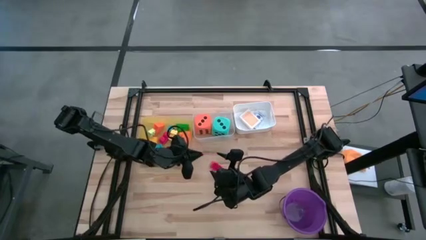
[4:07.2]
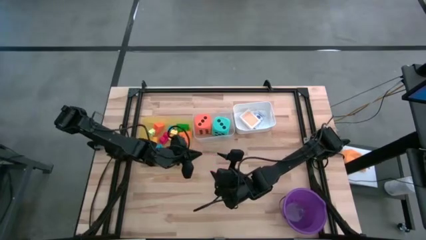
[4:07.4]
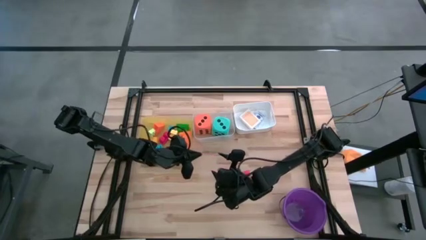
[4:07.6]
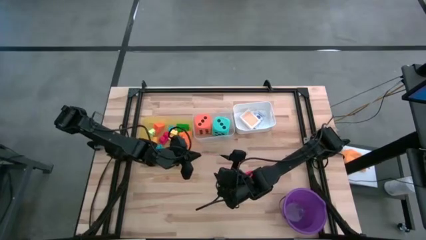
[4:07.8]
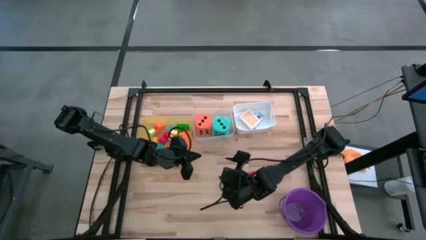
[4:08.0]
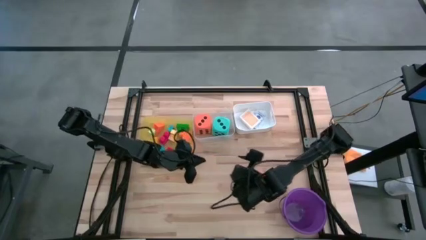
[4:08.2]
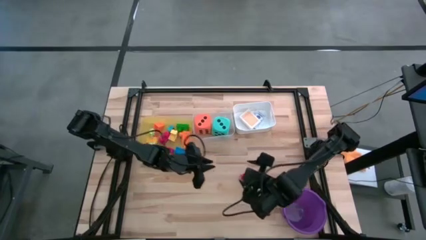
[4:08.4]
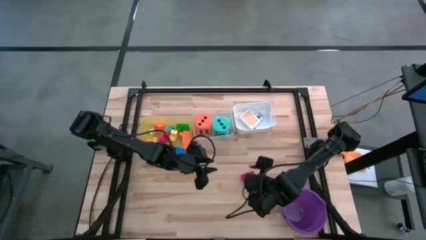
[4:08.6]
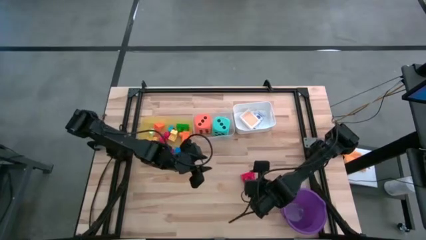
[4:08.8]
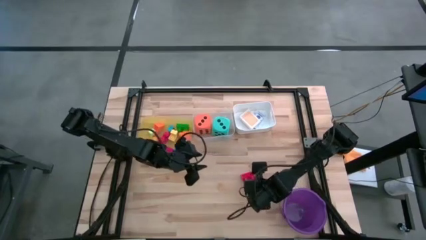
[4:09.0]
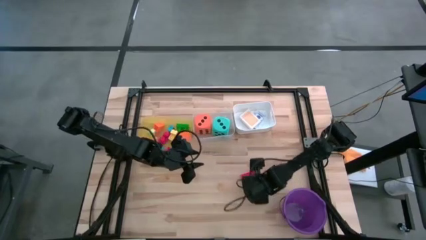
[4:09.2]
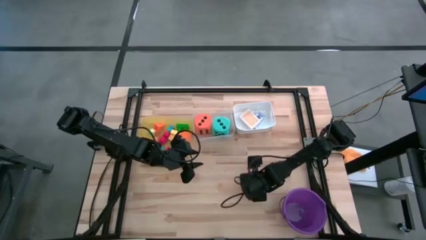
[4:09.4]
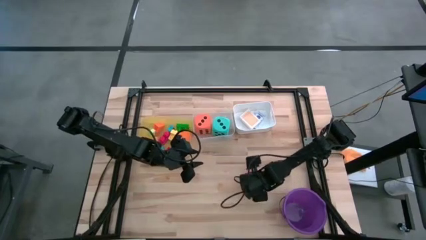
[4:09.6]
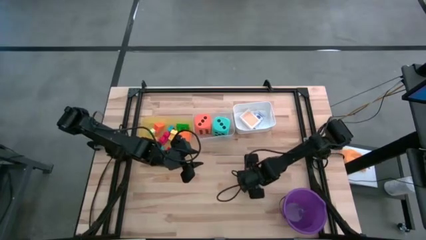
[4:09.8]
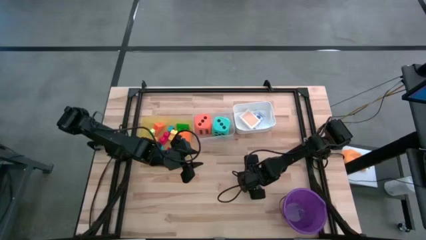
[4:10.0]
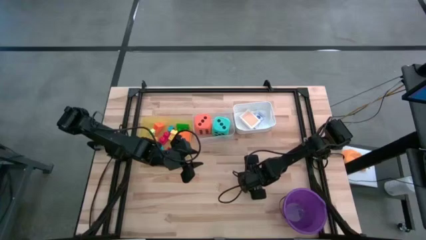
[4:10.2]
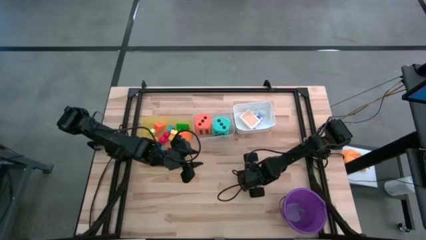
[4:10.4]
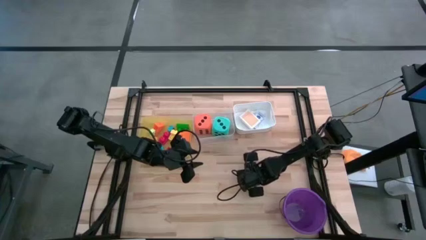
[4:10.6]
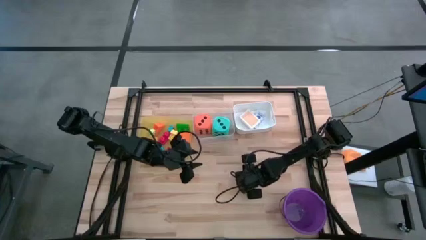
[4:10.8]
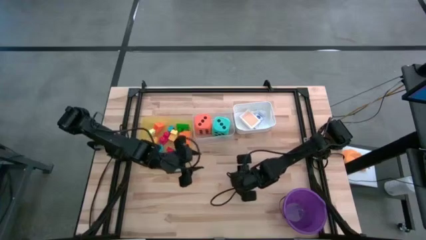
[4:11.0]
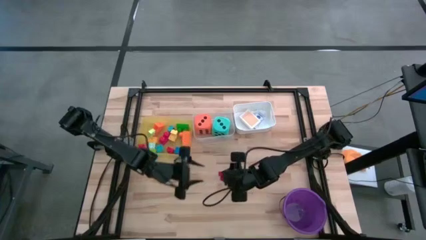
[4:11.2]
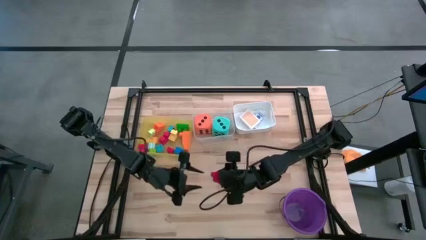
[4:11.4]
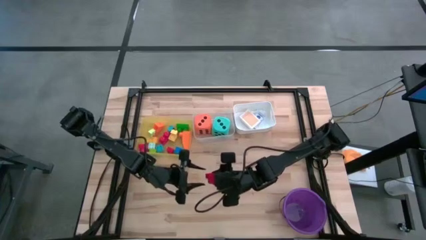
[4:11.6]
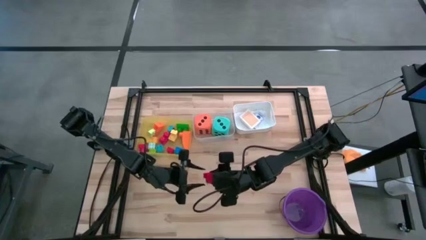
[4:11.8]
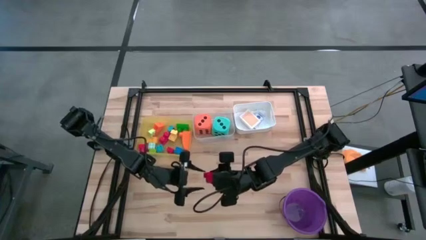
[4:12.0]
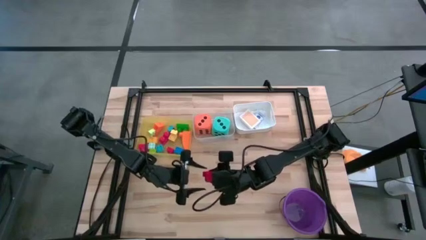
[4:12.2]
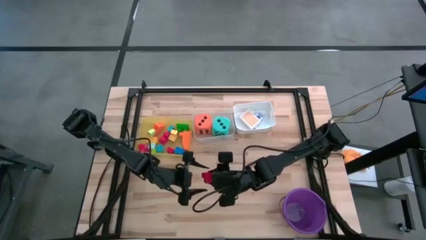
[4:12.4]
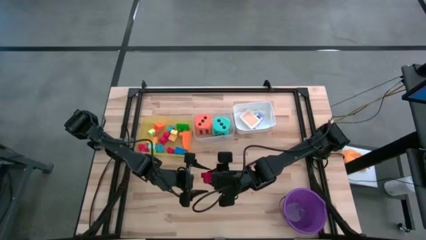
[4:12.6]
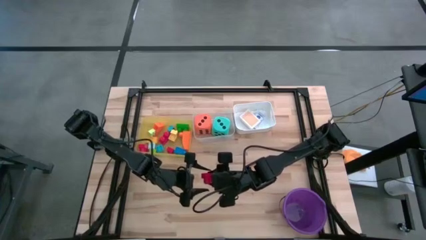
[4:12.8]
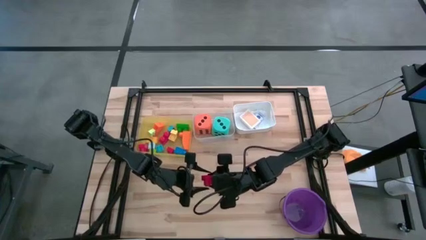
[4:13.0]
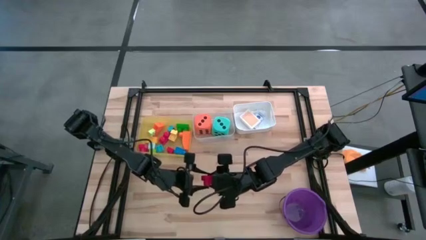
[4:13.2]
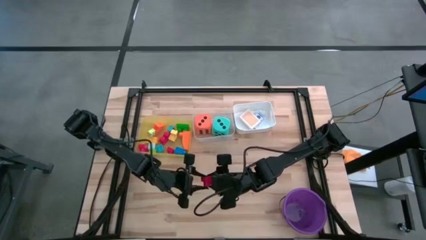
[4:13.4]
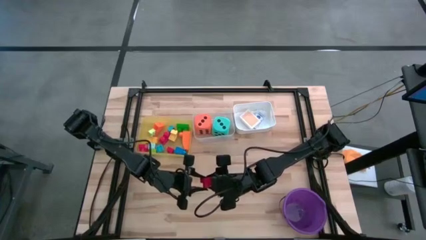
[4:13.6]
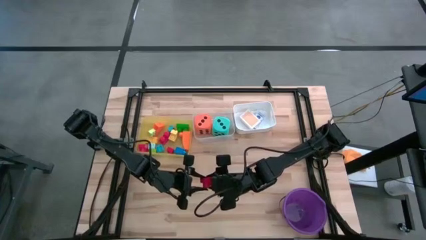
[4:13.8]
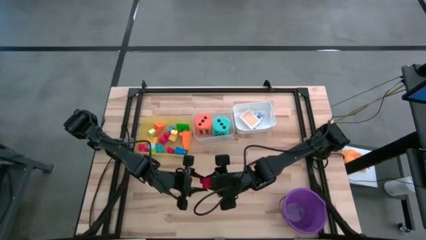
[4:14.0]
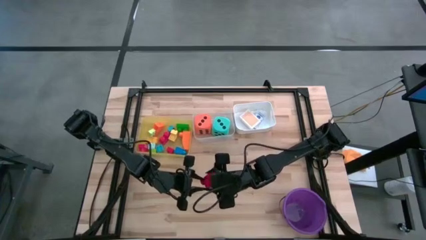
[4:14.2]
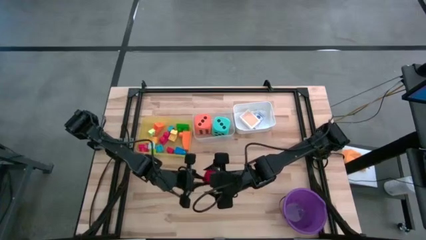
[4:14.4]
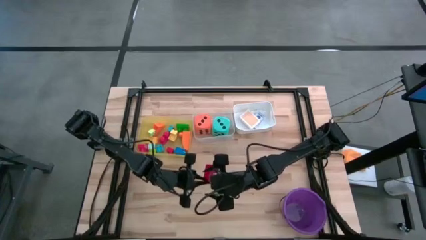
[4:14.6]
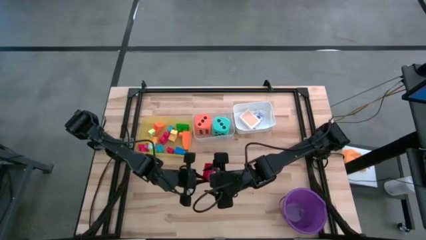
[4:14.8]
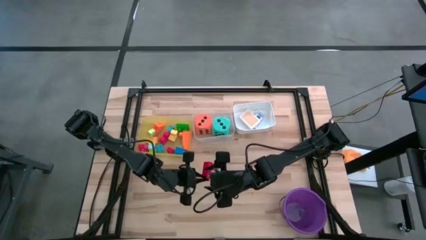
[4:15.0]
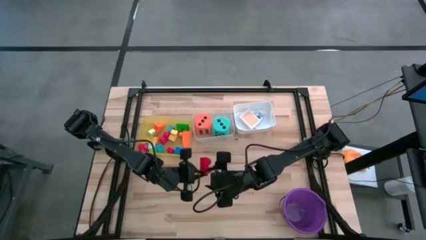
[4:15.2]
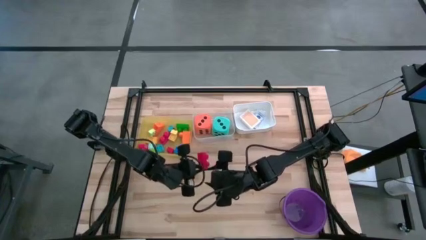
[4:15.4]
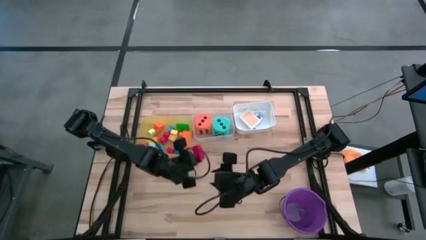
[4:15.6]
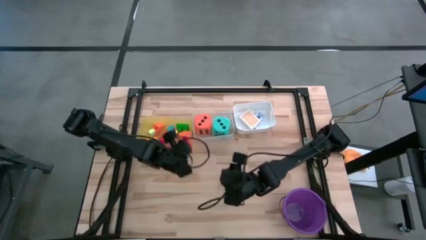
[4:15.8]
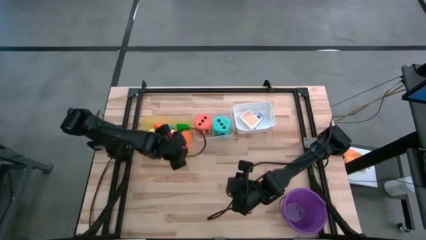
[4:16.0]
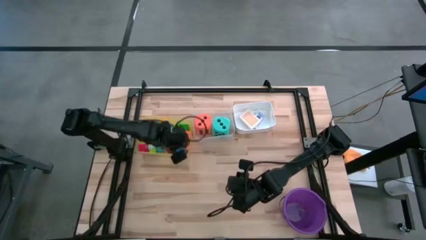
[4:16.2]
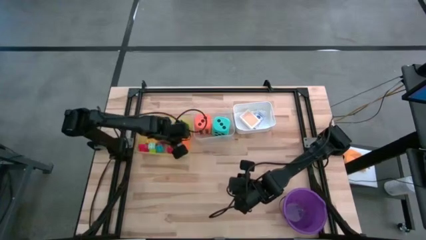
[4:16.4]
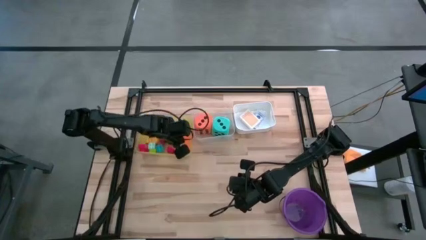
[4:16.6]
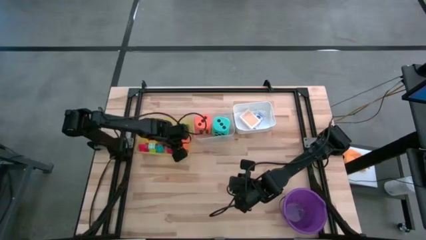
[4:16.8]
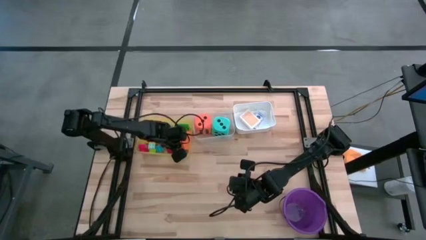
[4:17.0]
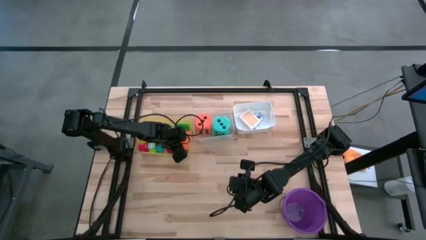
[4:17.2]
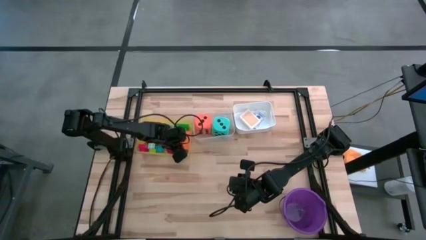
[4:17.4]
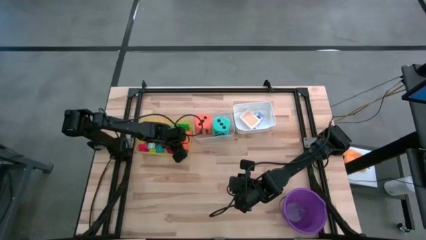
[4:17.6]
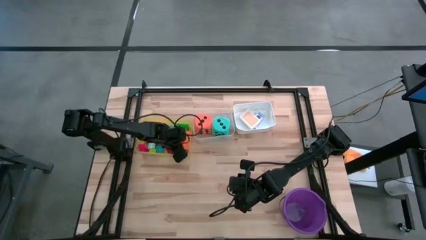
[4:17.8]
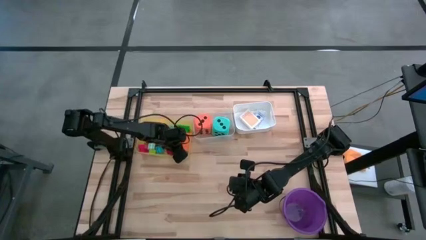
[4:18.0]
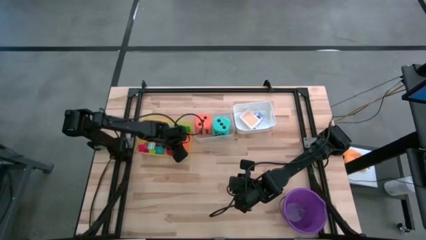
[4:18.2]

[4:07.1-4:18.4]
Task: Pick & Place Toys
Put the red game piece into the yellow bin

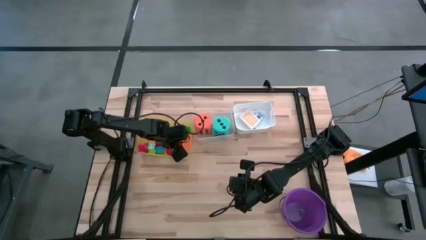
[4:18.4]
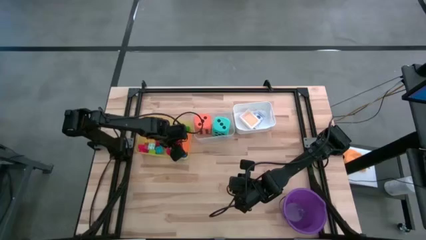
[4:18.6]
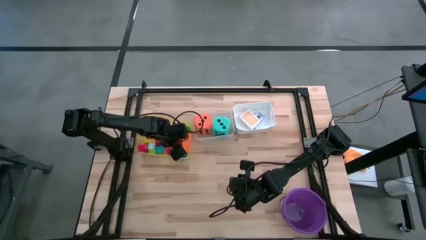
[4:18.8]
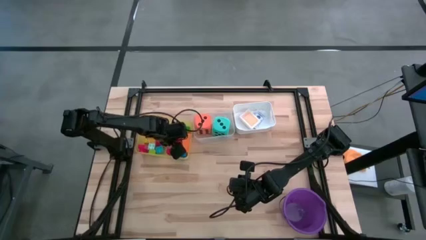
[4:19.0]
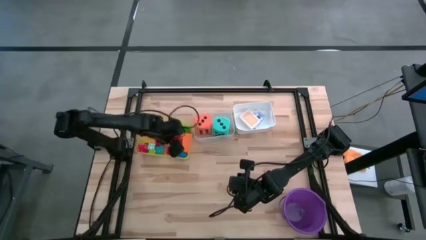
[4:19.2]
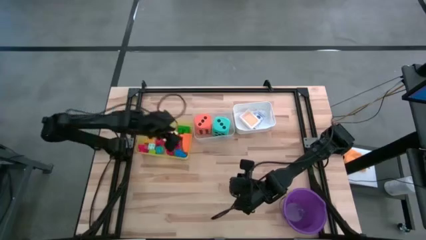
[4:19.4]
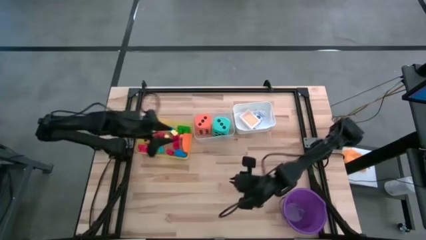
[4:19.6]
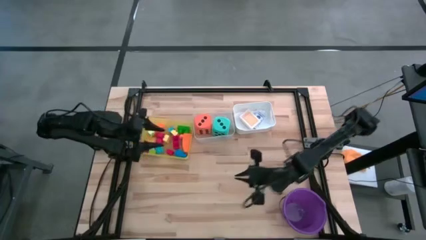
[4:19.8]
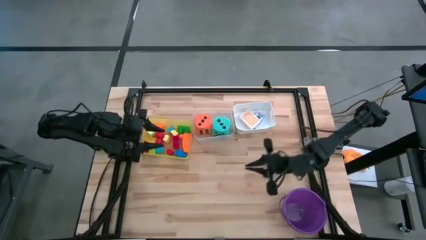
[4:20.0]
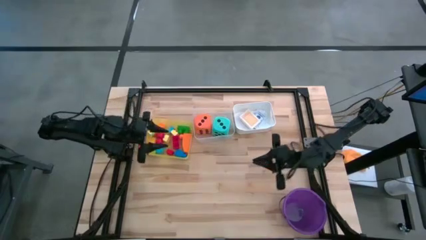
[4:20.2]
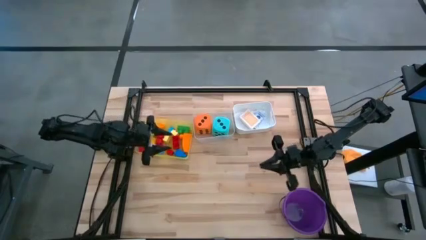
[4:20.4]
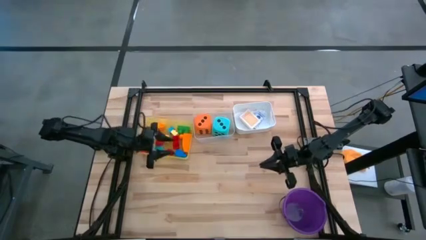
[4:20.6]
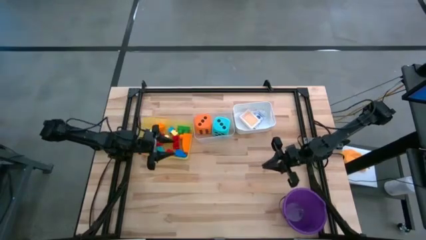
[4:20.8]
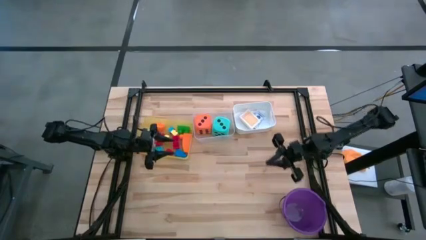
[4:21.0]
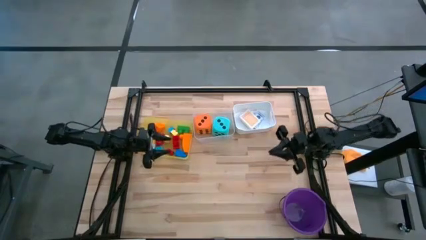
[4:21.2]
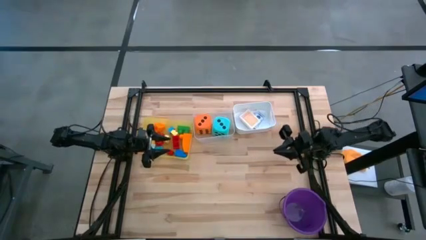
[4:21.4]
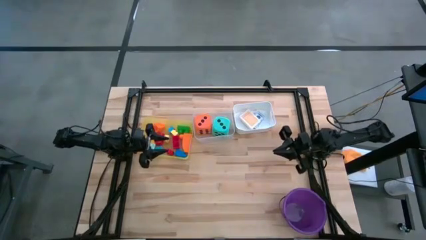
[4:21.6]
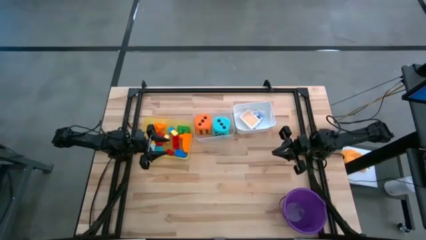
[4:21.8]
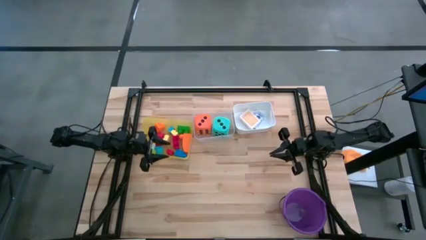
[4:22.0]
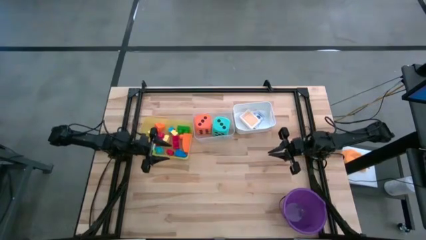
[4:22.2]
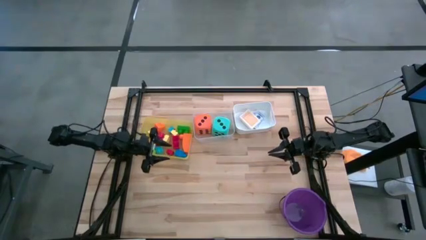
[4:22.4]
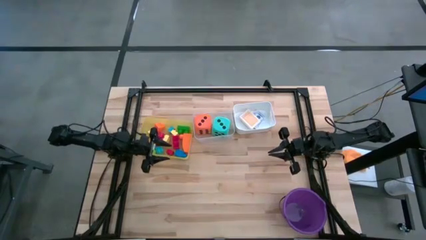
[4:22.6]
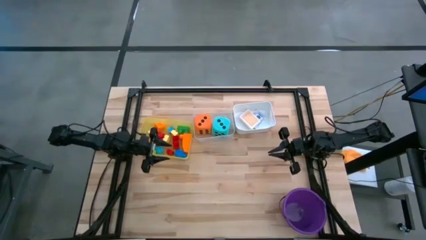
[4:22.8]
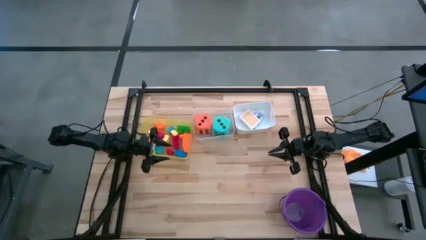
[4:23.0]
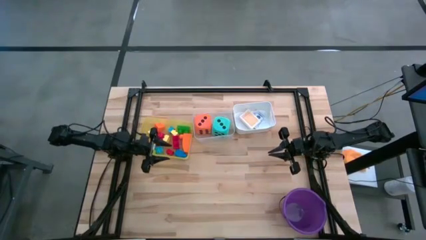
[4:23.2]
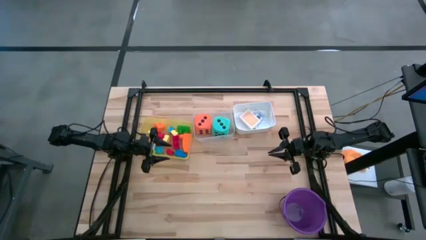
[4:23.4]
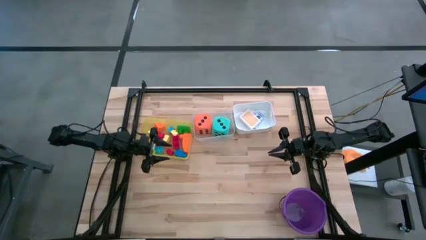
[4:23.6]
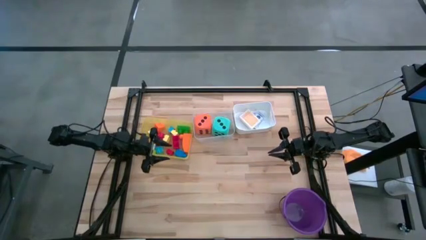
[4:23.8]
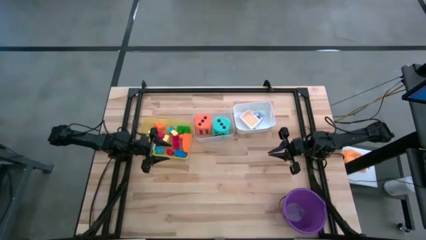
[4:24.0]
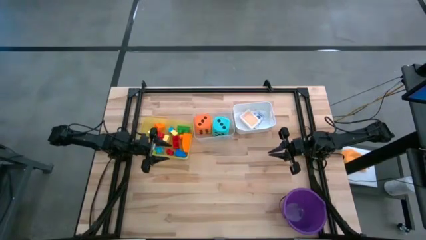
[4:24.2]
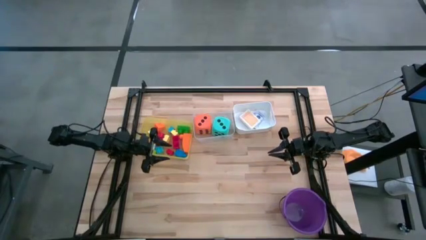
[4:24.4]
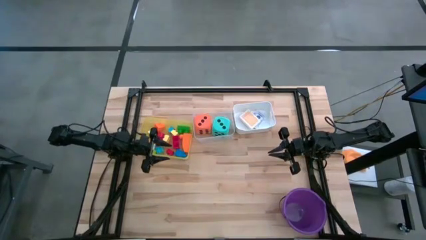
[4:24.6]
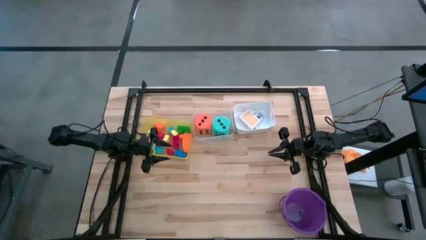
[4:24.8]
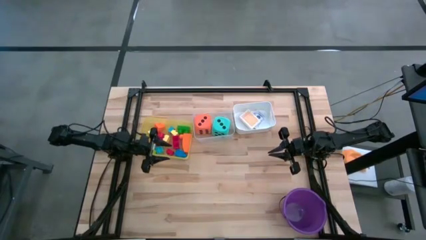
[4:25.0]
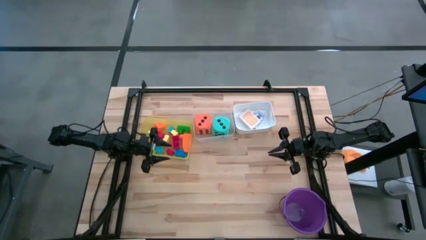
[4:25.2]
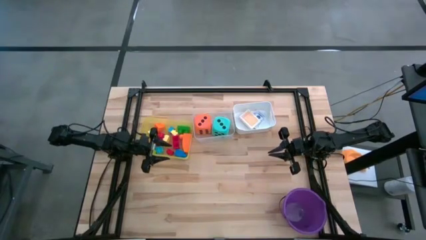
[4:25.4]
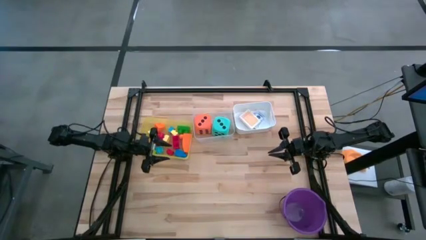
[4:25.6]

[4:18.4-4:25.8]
Return to Home Position
